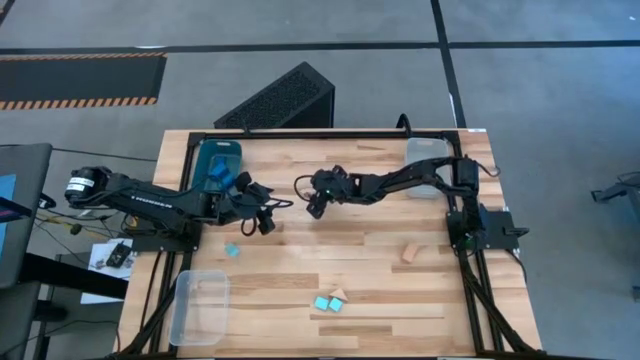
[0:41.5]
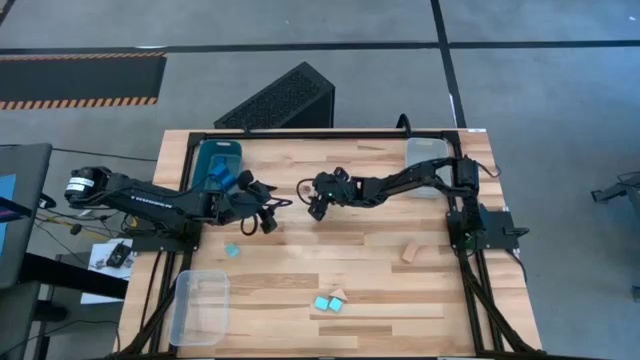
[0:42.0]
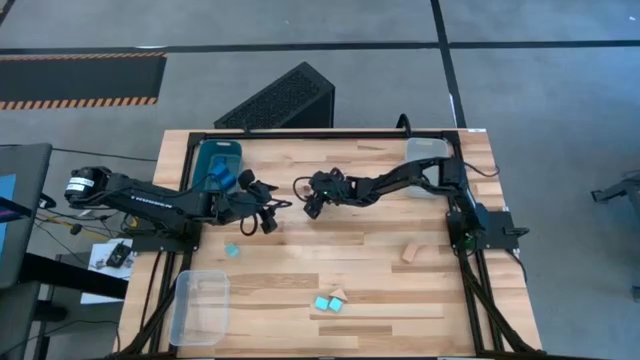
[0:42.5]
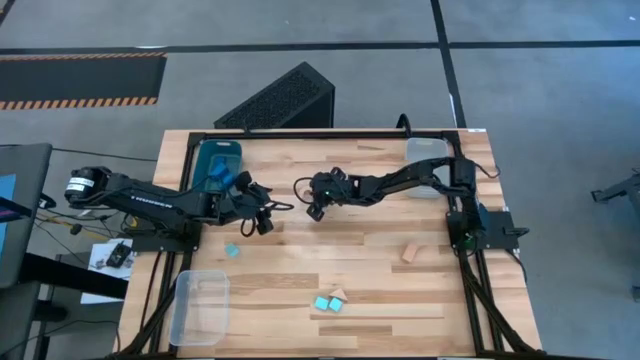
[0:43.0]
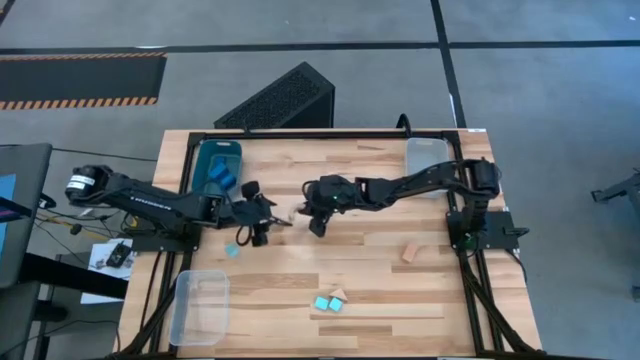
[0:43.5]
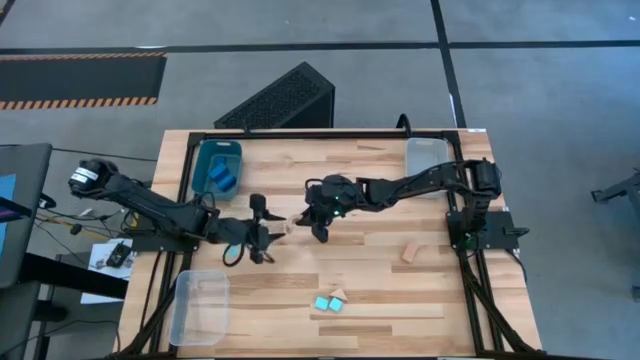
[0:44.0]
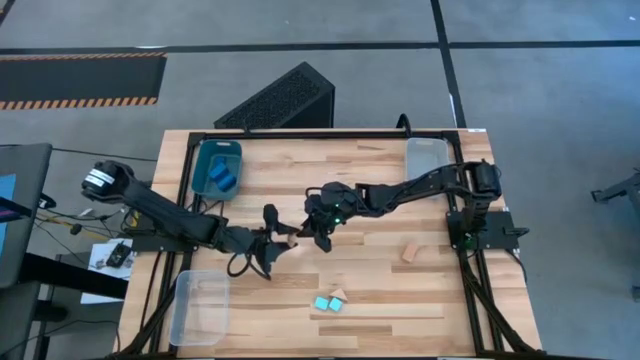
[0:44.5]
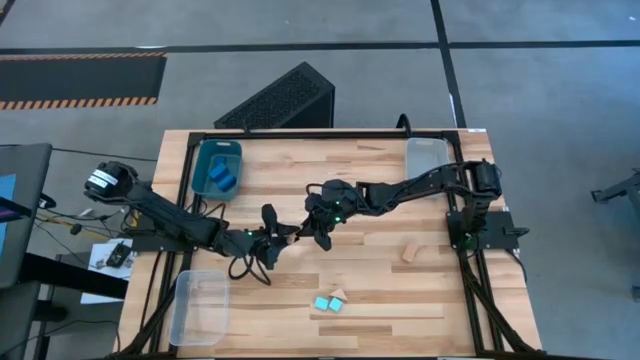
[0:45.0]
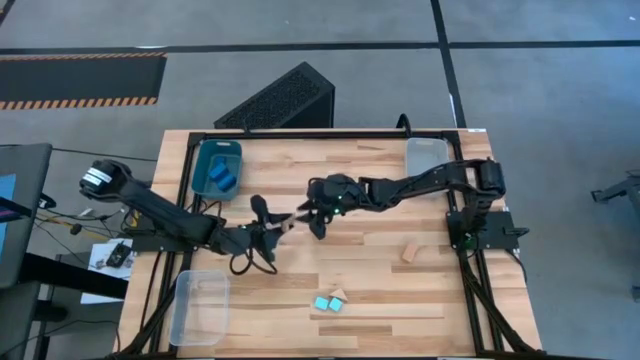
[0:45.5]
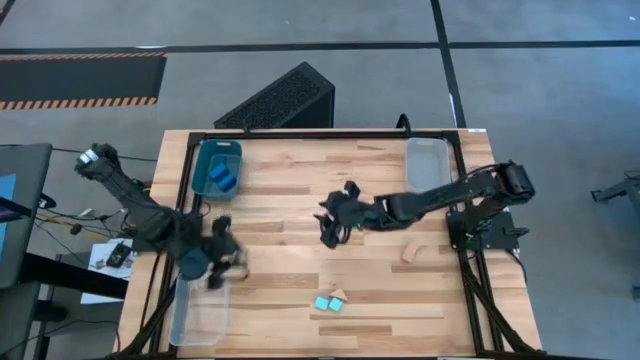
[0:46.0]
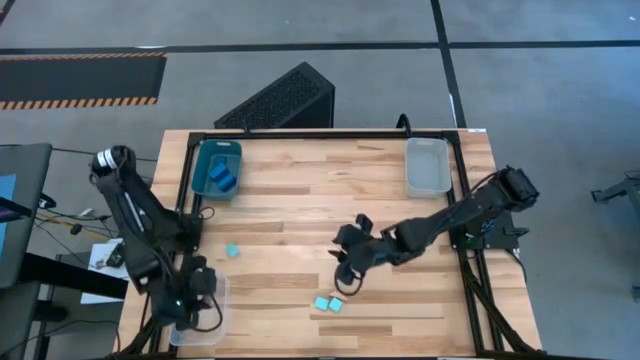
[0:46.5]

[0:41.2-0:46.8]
Task: Sort & place blocks by color
Put the top brown block into the transparent bin

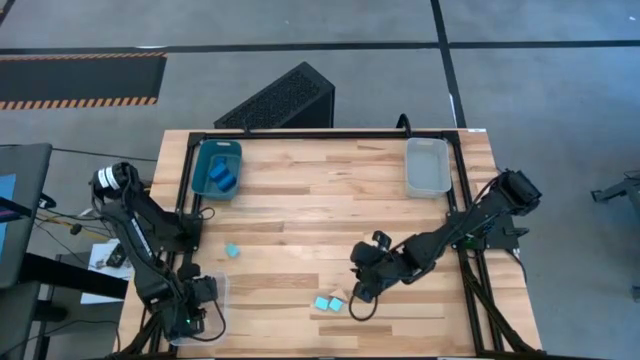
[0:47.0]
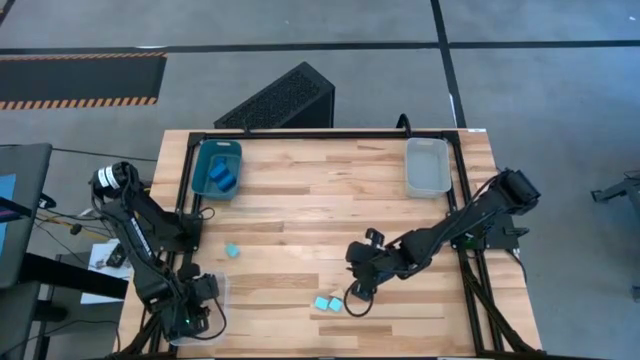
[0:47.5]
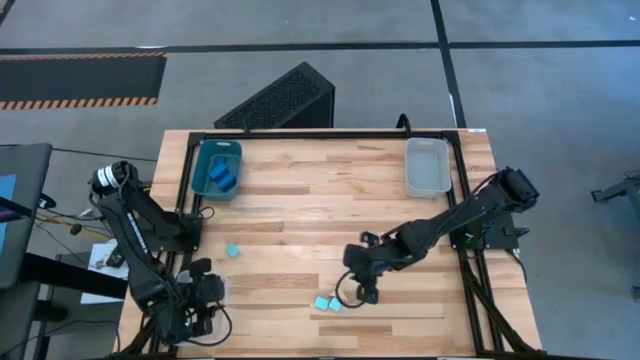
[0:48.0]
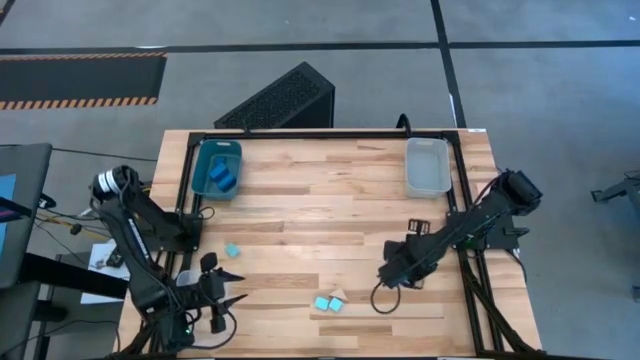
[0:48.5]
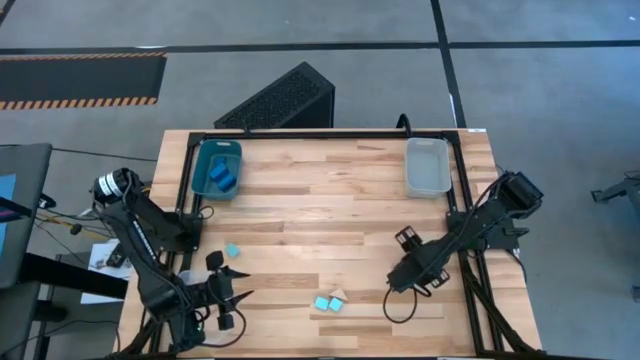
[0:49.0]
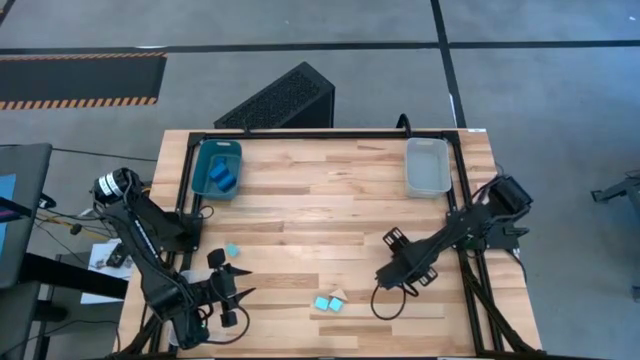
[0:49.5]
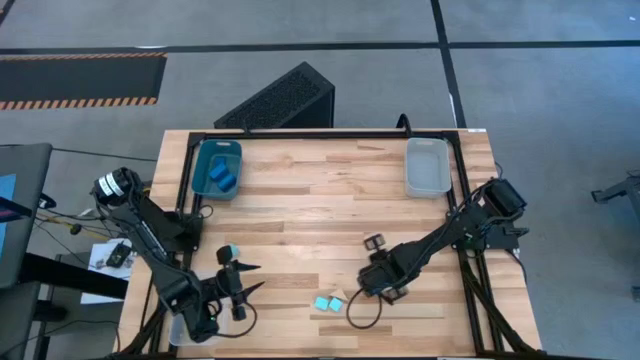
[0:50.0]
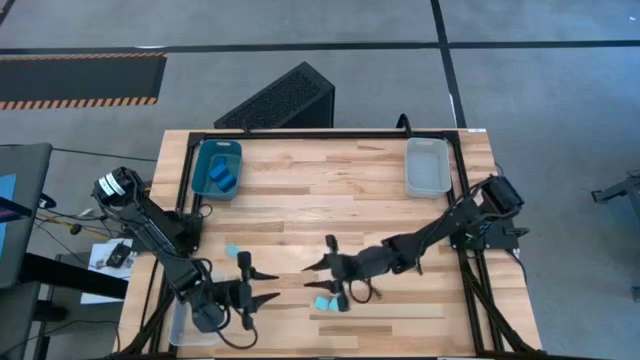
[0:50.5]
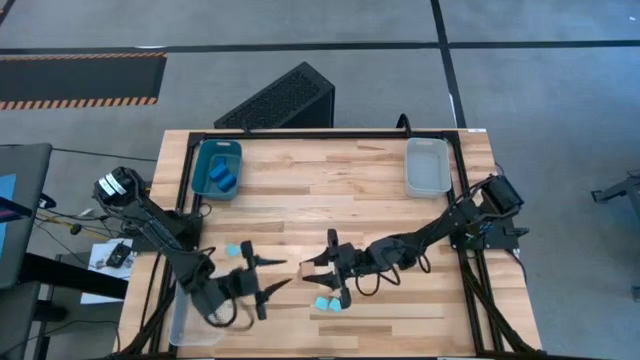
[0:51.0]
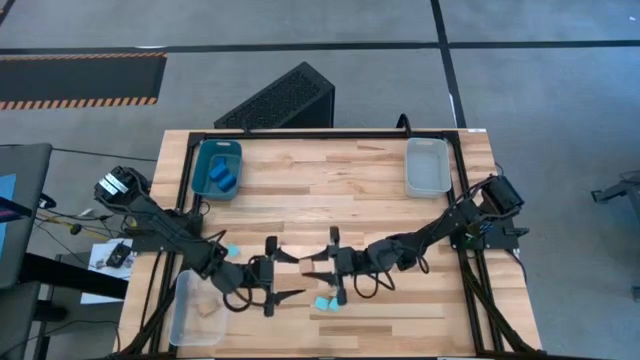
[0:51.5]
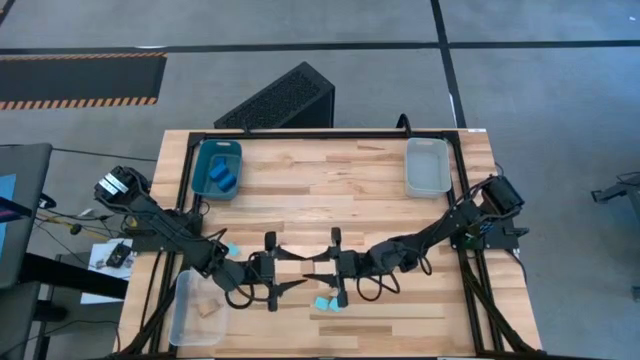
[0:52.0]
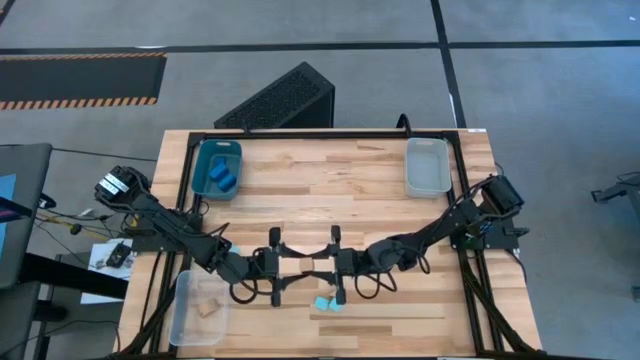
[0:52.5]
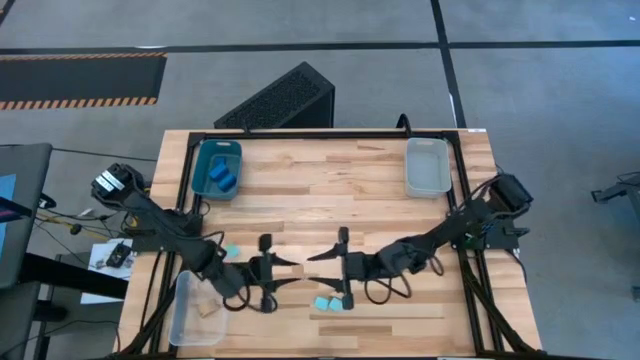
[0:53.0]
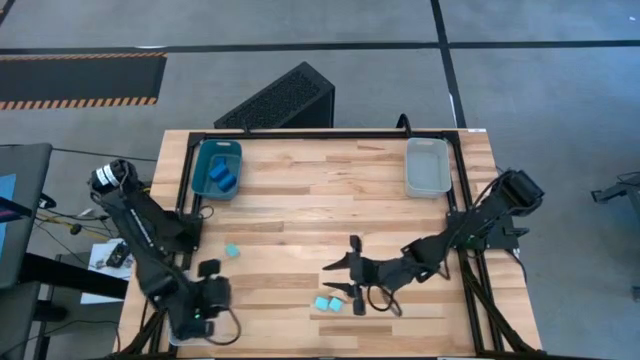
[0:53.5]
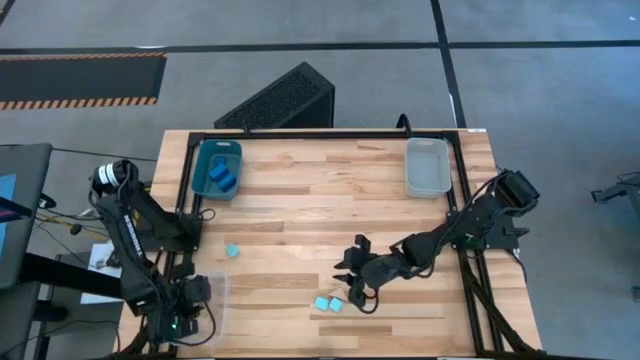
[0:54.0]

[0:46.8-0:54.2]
Put the right brown block into the transparent bin

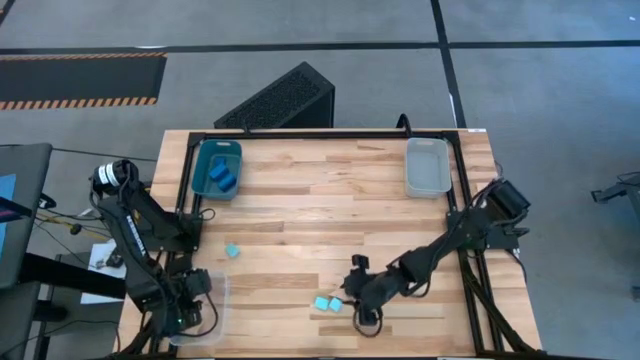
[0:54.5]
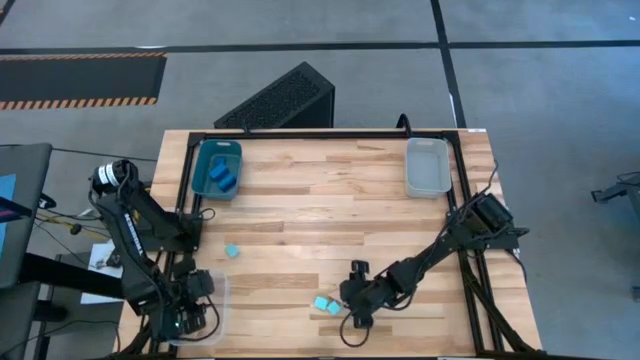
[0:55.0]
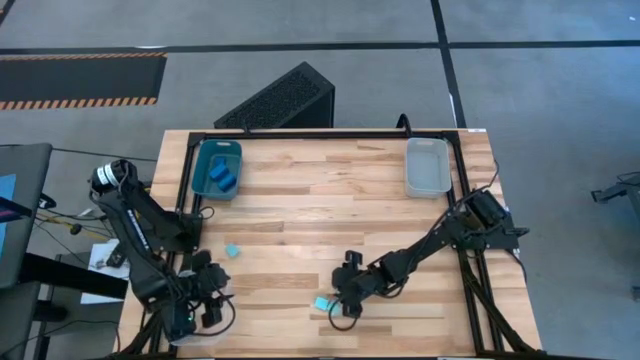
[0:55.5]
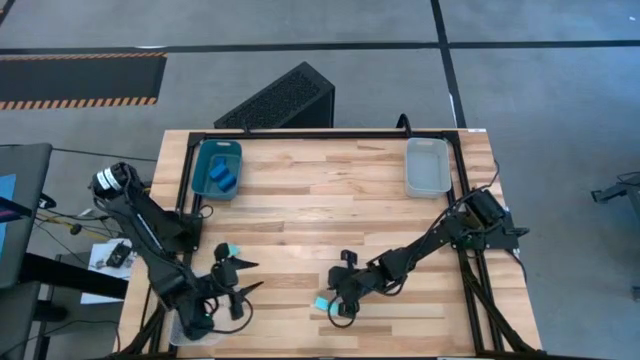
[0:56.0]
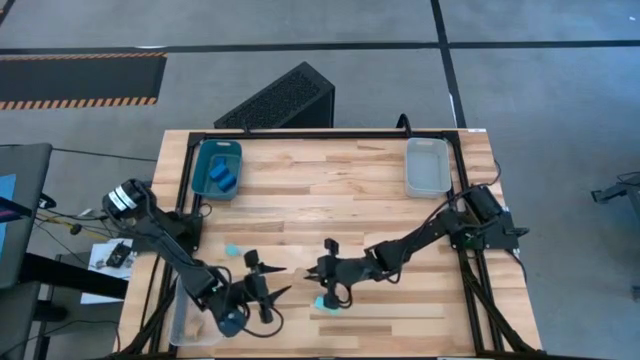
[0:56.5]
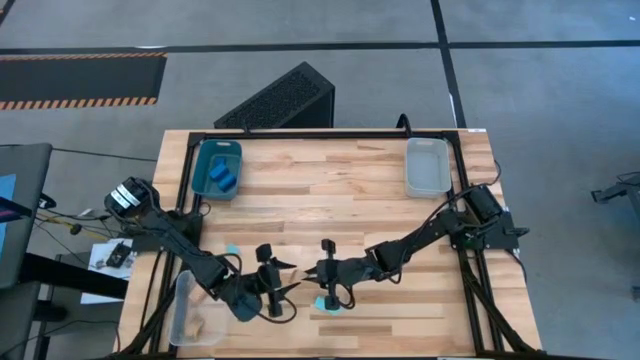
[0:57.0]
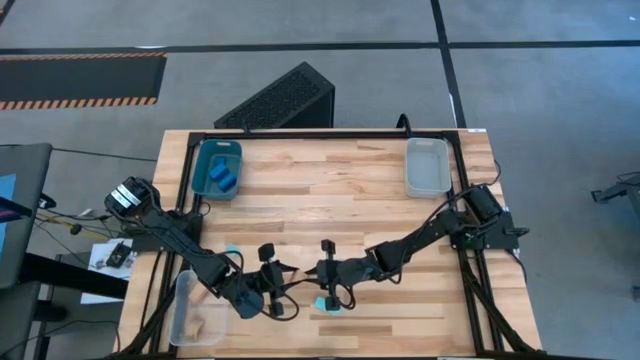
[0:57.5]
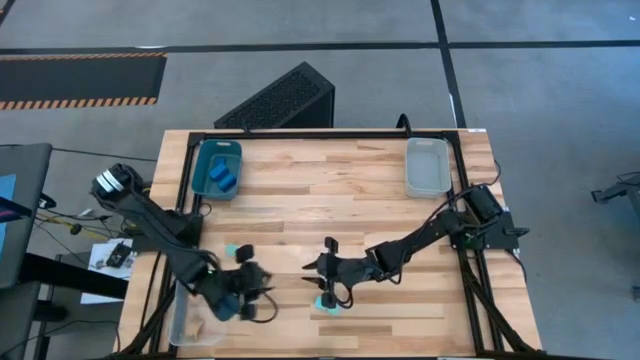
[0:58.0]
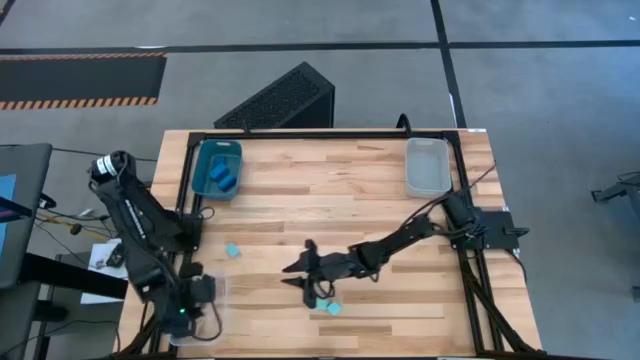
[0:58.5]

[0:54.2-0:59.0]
Put the brown block into the transparent bin

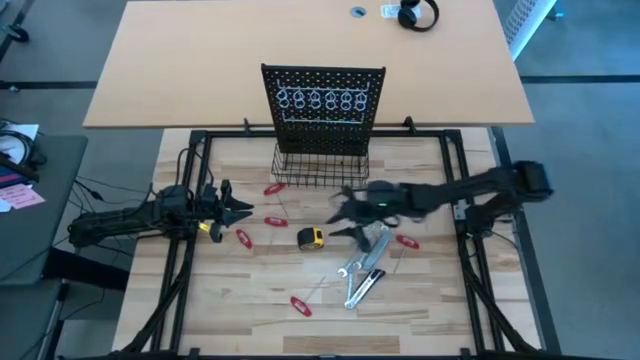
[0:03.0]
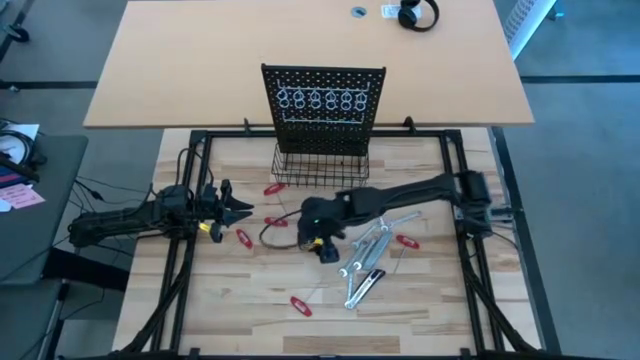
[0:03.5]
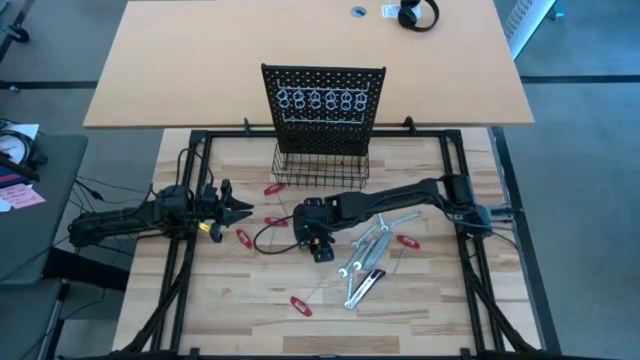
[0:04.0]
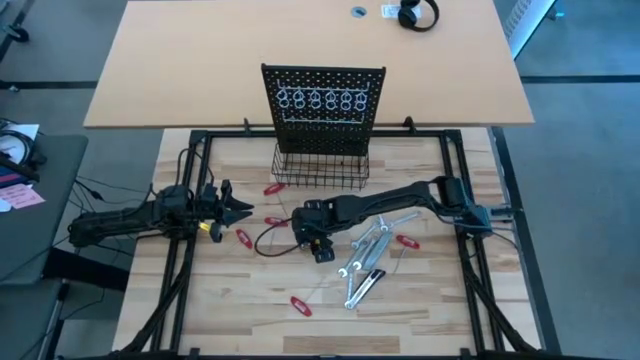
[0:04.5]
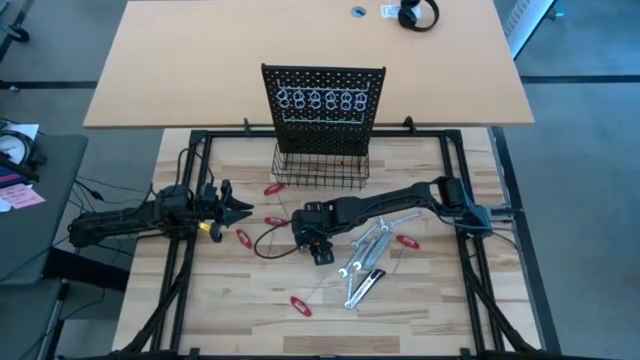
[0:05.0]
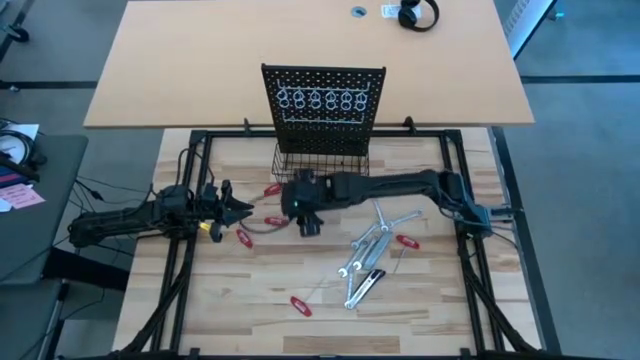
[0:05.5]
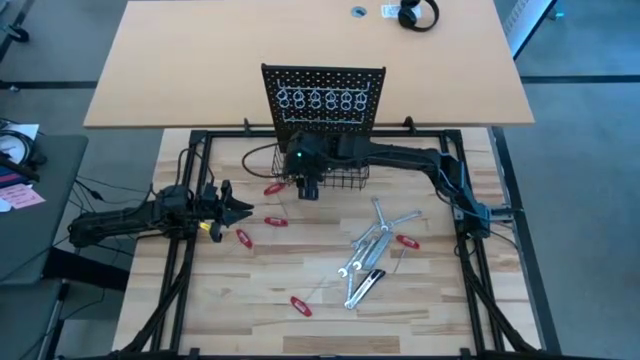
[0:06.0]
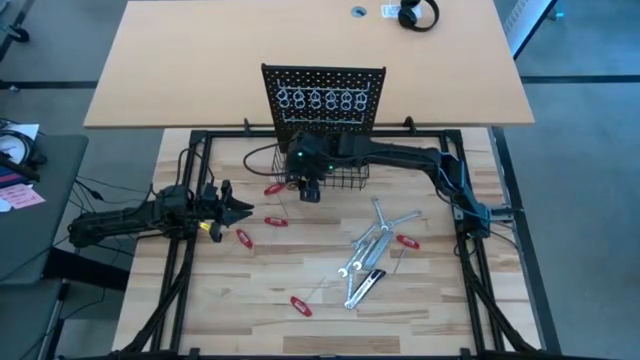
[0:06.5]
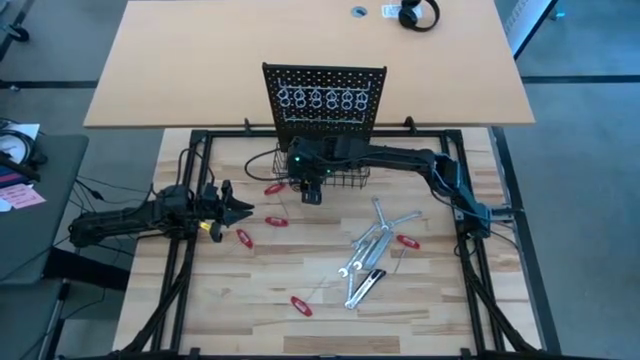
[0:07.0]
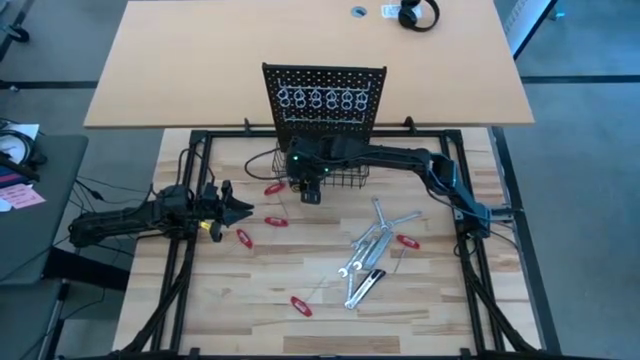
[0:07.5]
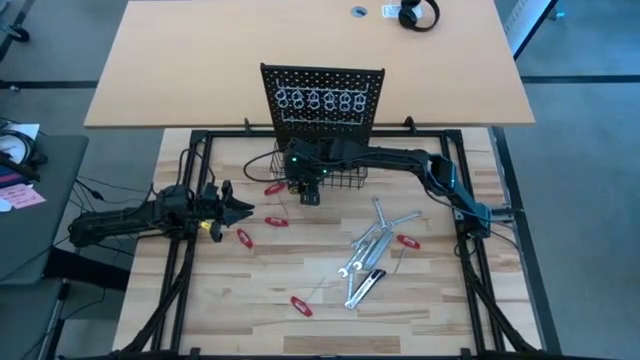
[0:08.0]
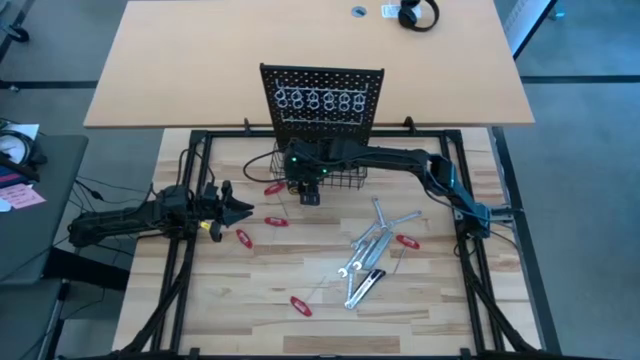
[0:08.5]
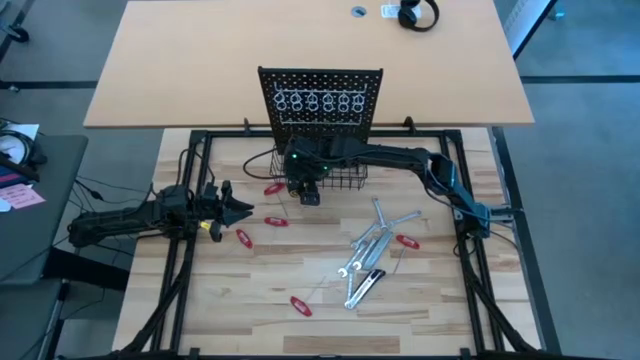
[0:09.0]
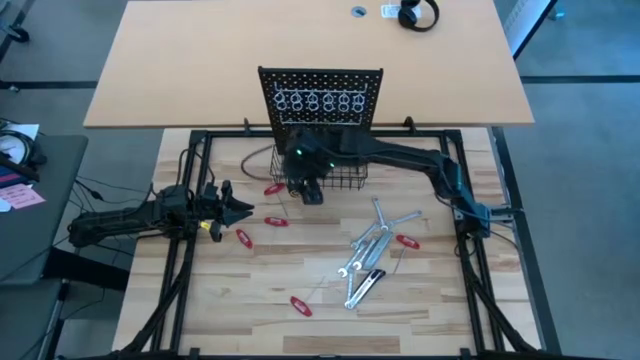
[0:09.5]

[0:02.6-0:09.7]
Task: Hang tools onto peg board
Put the meter into the pegboard
